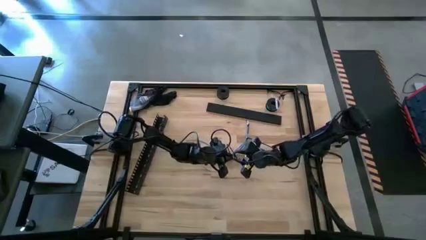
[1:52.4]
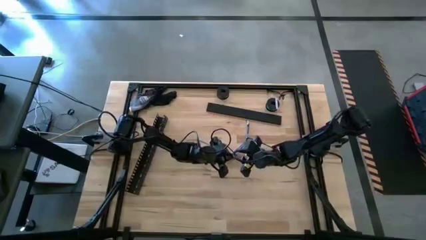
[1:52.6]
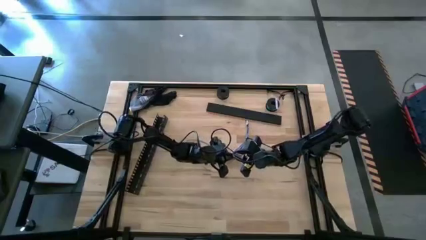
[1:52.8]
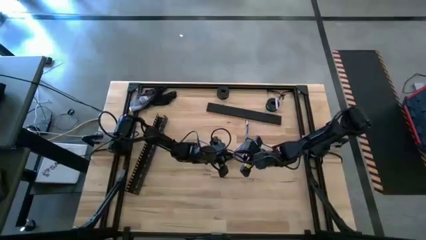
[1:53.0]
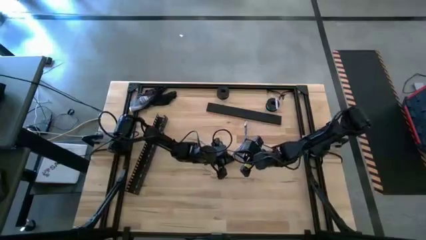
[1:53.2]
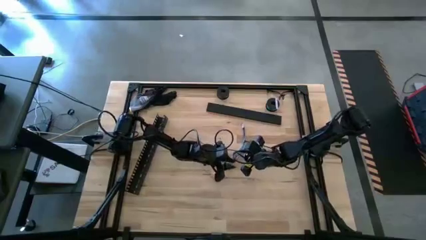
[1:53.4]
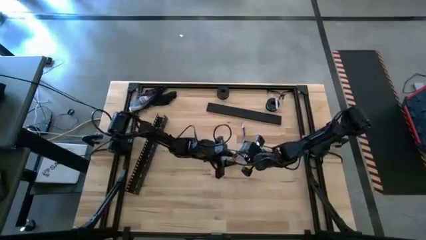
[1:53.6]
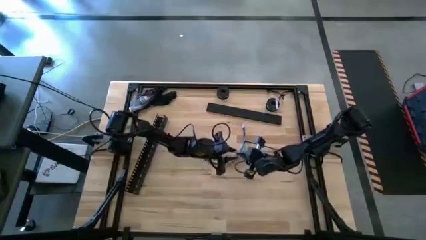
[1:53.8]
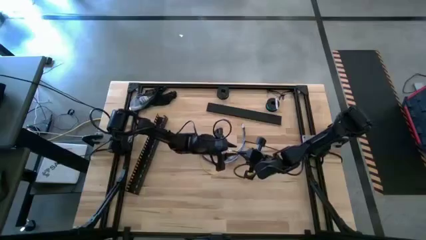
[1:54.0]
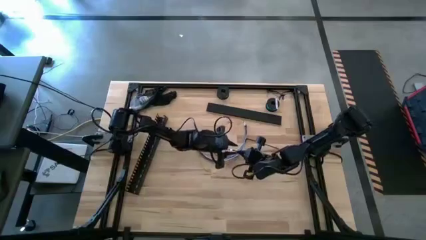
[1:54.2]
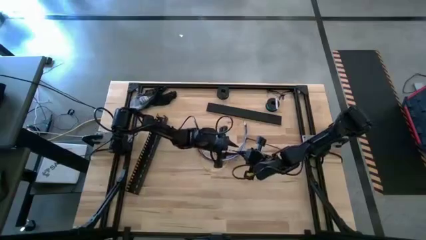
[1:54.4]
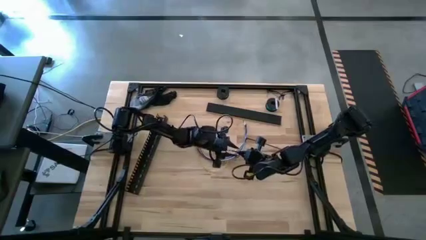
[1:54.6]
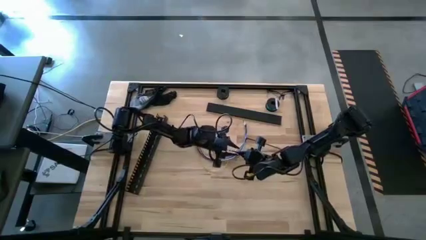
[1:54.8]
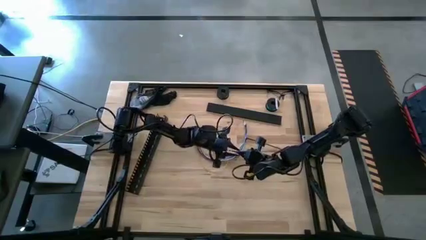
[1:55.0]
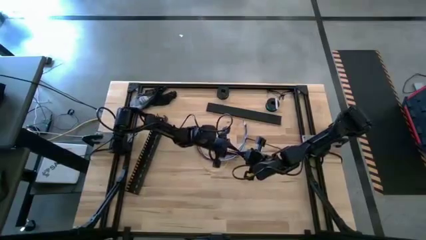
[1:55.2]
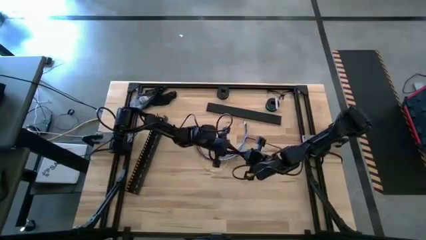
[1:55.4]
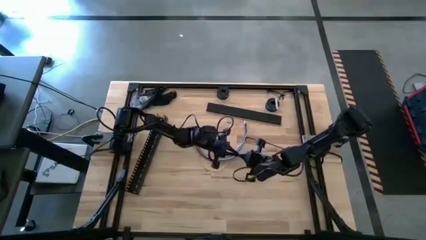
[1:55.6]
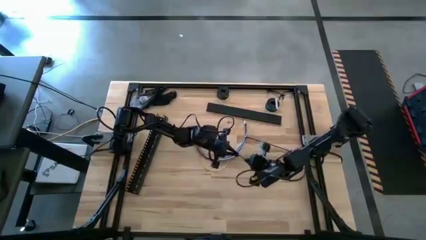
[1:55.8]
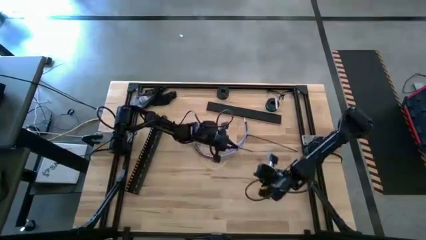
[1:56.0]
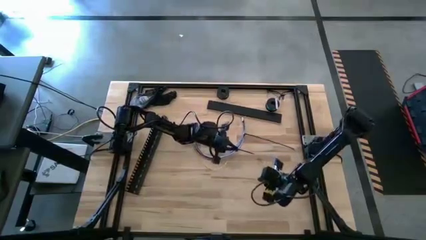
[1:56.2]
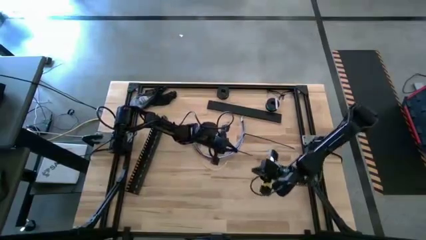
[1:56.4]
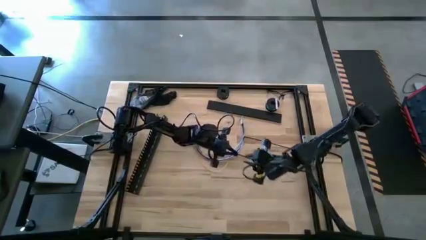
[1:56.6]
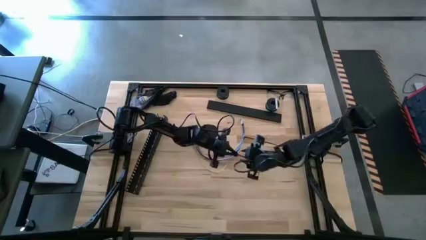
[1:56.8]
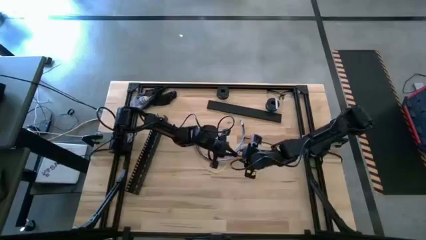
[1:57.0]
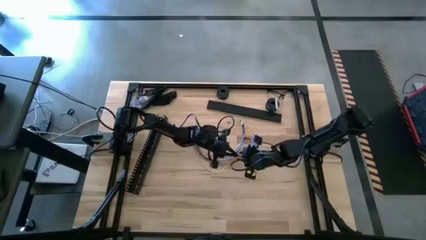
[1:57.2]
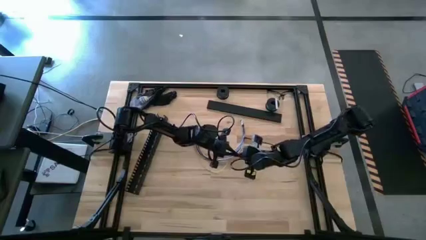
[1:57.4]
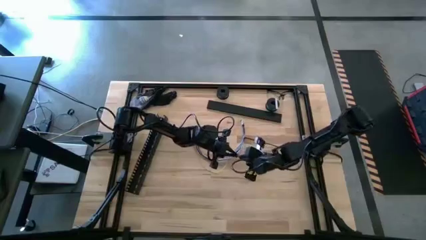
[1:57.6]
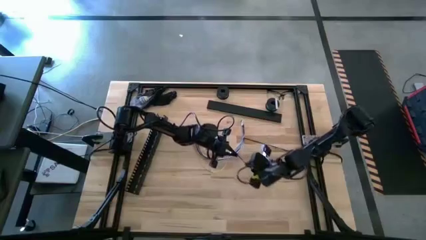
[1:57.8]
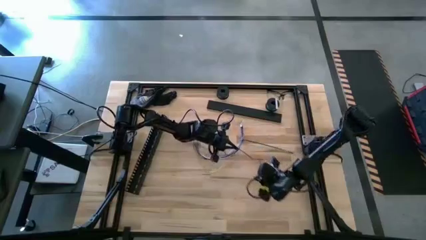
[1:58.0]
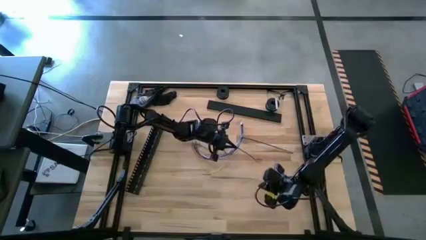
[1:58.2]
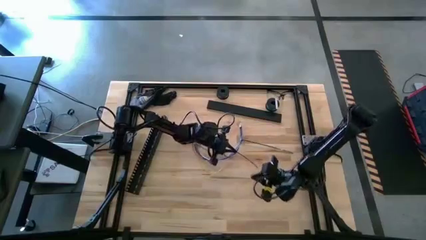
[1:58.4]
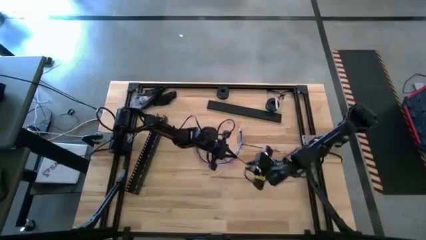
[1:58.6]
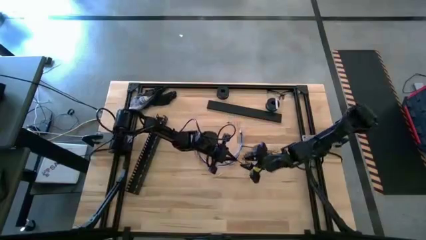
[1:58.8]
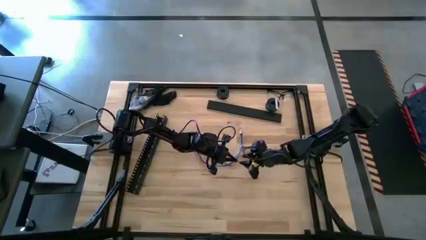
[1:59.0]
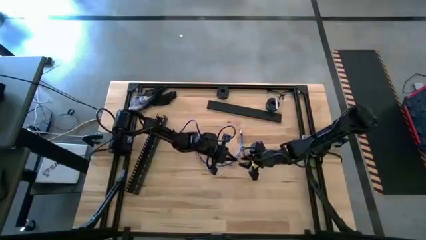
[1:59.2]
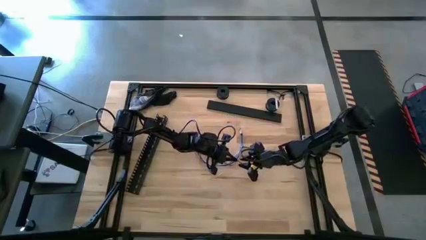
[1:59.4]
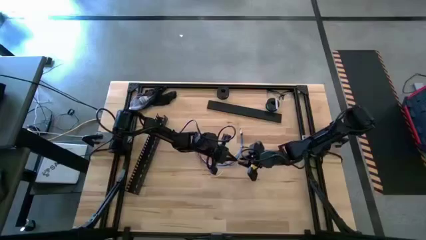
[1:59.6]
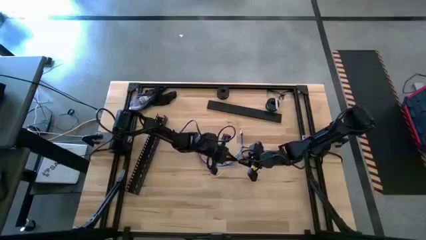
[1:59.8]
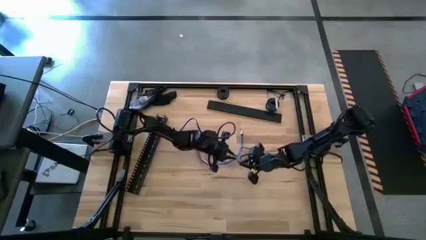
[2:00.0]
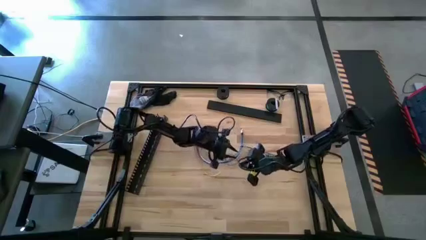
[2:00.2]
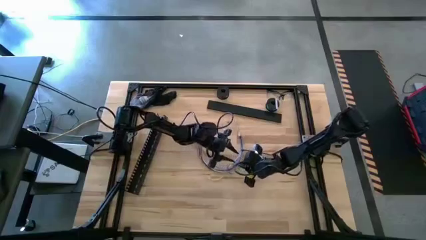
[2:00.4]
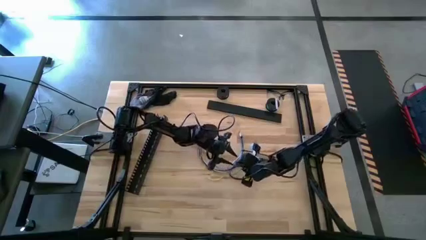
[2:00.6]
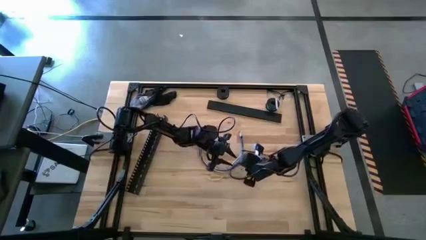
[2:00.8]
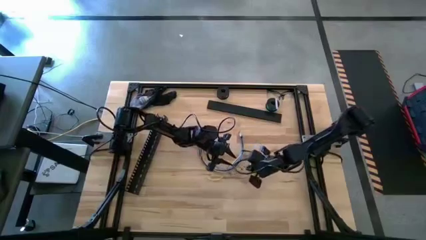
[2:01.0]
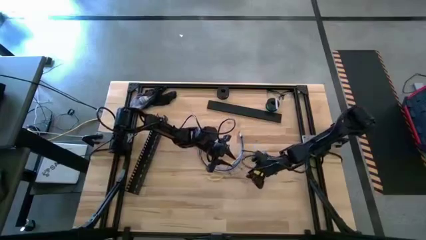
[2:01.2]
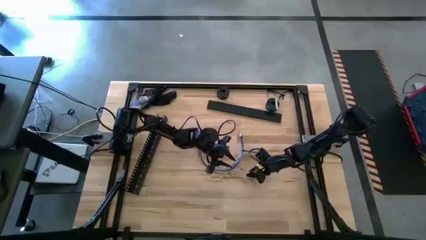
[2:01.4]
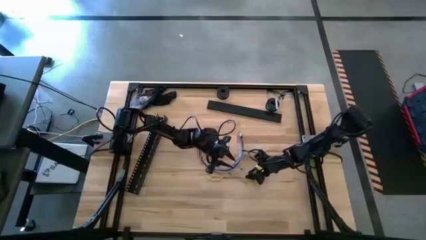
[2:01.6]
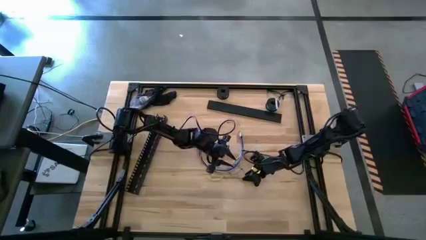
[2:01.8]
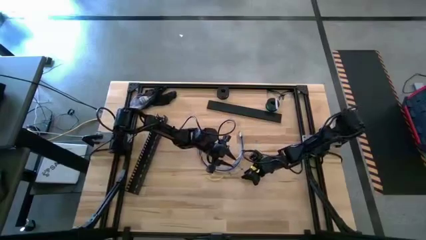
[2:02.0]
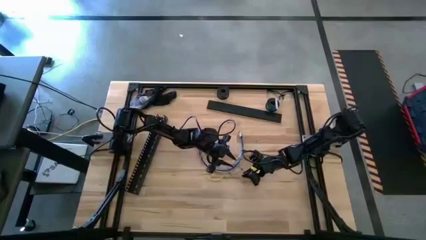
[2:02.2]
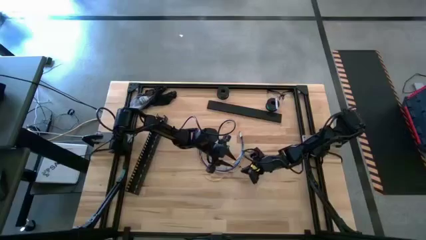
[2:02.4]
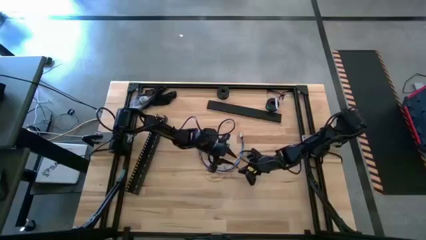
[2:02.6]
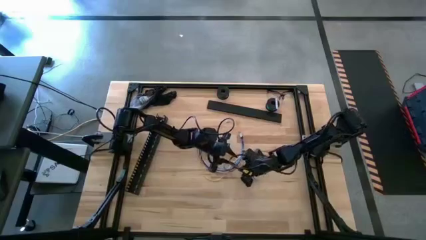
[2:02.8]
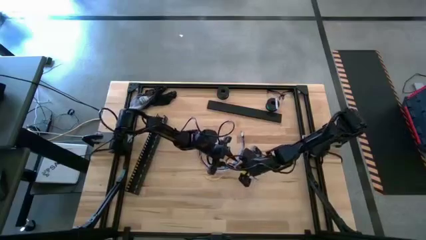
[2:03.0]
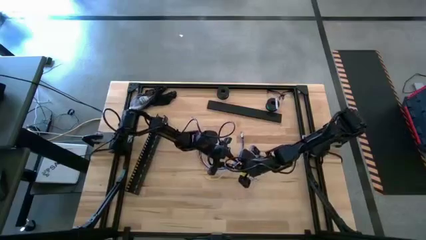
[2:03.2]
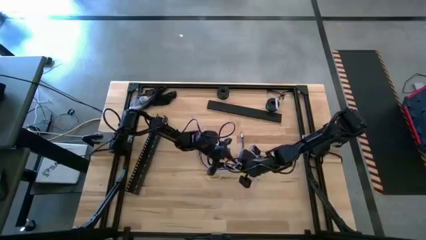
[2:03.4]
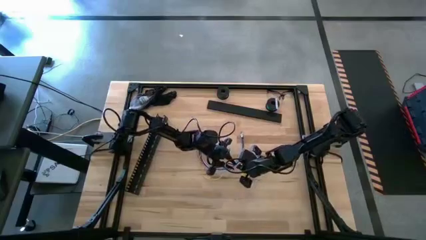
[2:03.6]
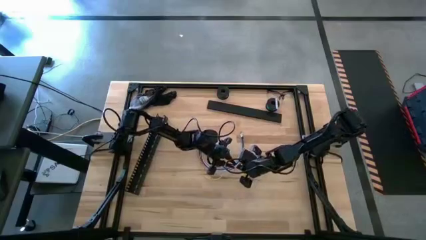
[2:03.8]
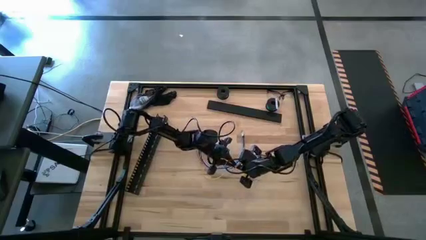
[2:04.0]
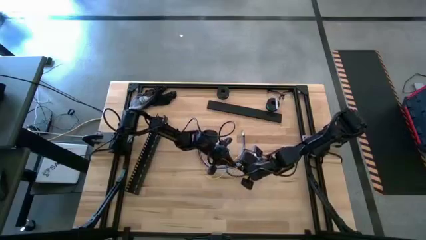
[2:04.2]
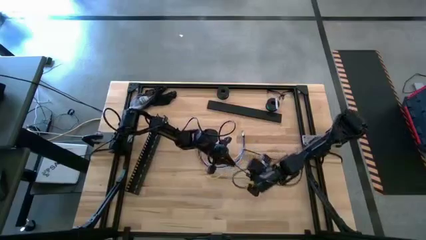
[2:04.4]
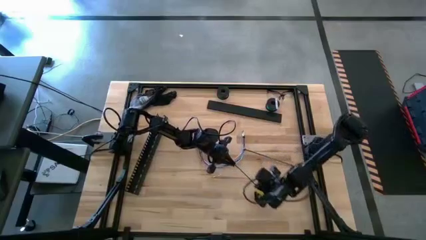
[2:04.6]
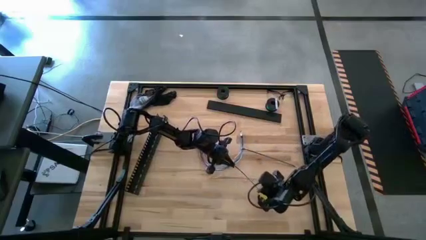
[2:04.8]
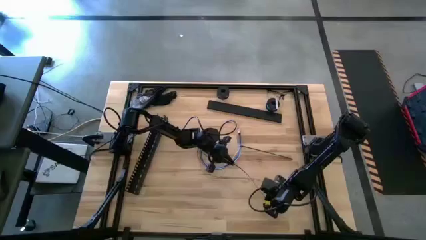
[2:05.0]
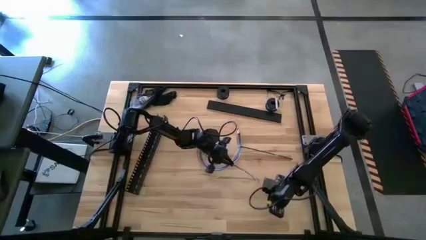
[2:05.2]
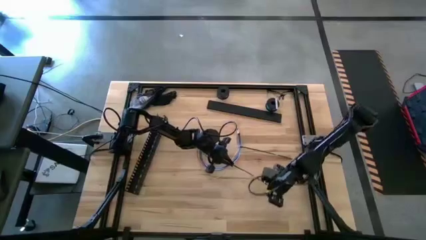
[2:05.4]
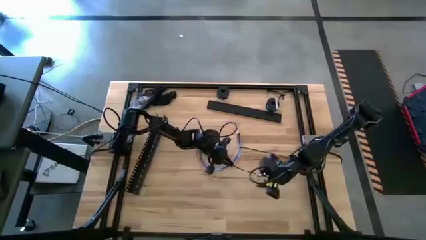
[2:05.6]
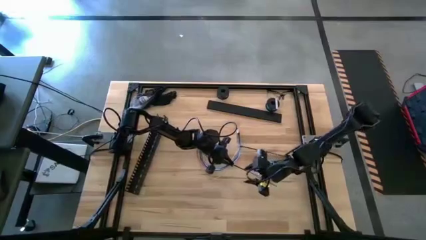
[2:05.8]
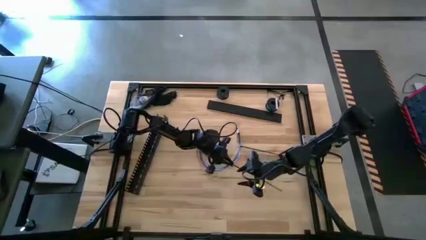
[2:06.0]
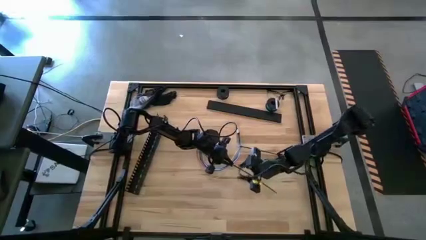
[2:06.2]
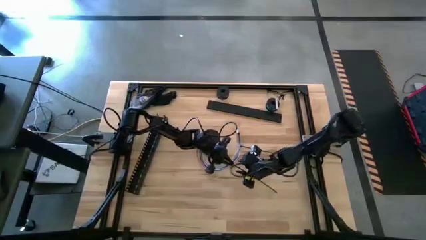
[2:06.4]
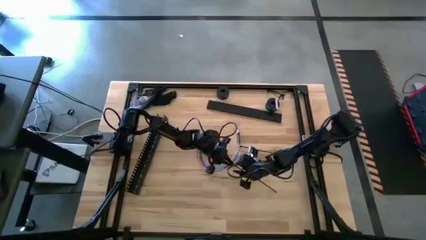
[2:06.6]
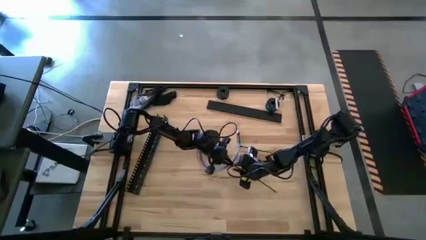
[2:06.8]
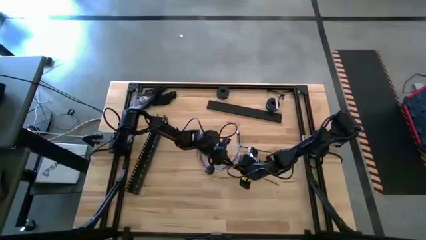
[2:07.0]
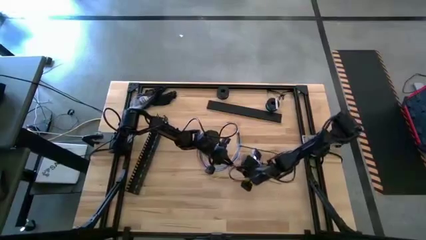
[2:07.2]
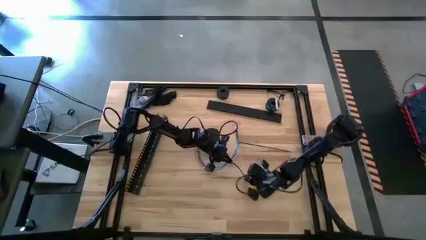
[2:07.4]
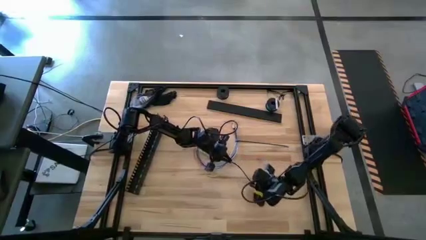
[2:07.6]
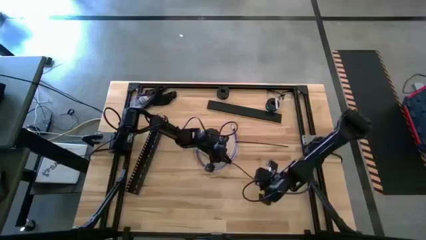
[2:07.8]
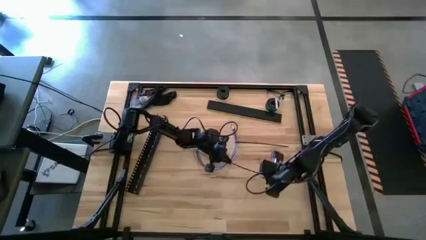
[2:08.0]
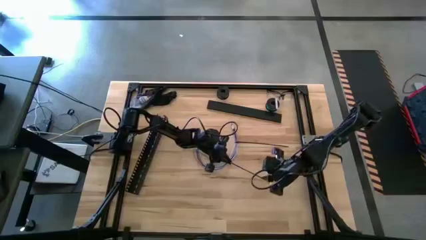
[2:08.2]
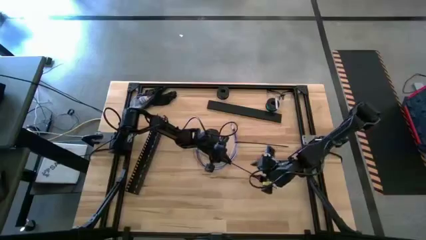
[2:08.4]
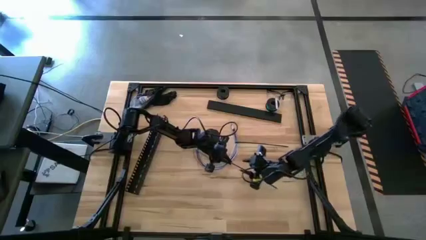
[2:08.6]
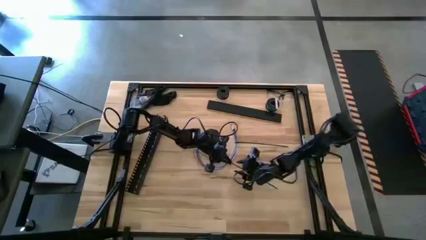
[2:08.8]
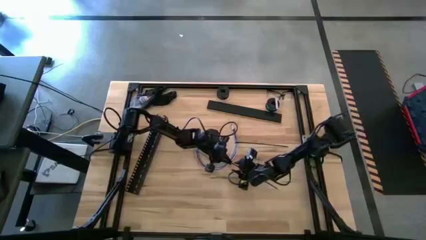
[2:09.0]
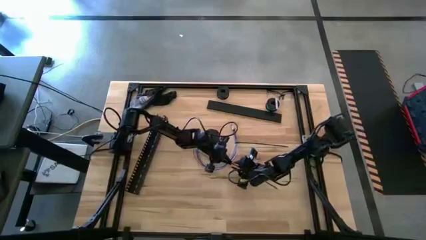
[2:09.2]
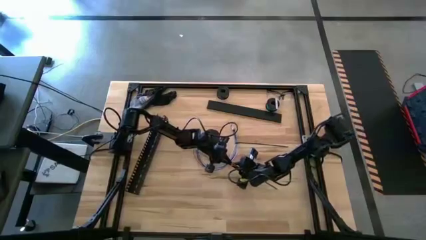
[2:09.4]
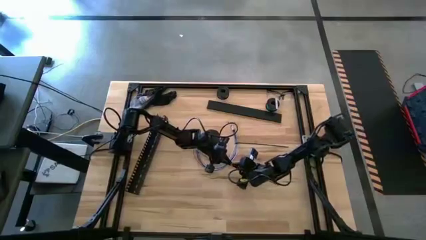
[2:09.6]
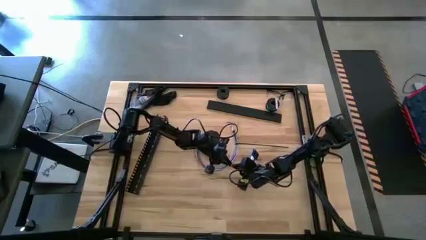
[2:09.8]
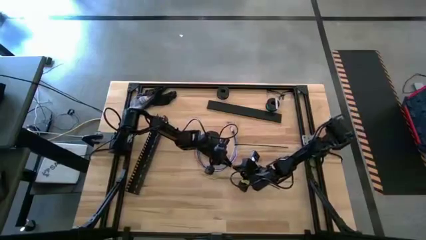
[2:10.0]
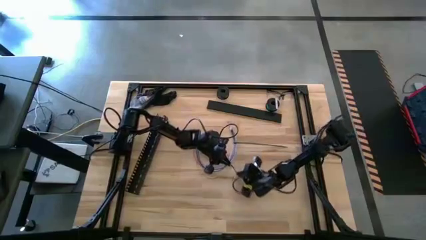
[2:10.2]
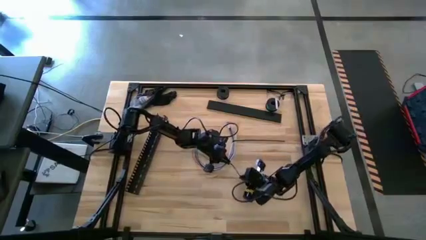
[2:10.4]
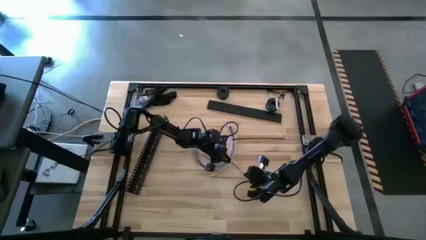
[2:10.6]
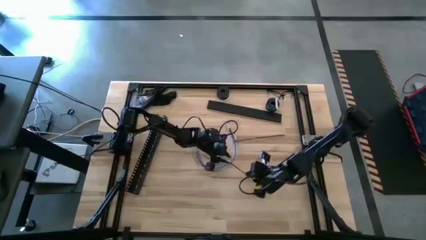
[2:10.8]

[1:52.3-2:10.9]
Task: Ziptie cables
Insert the cable zip tie into the cable wires
